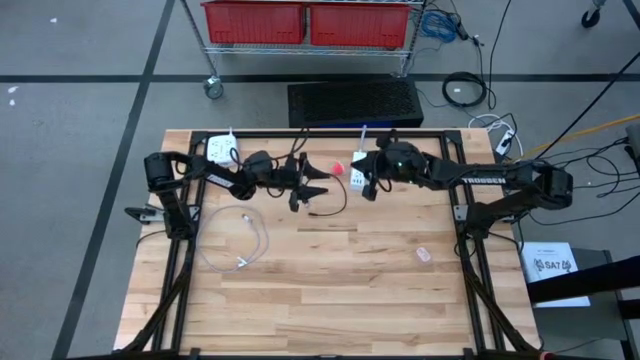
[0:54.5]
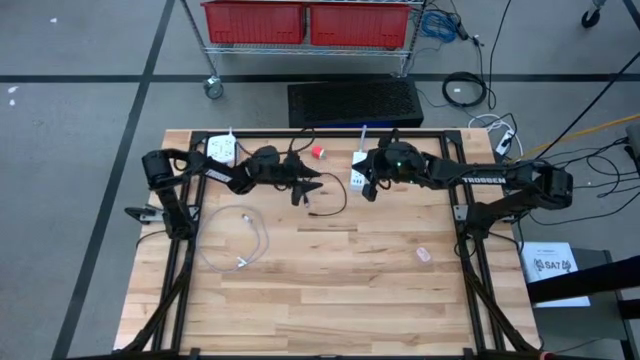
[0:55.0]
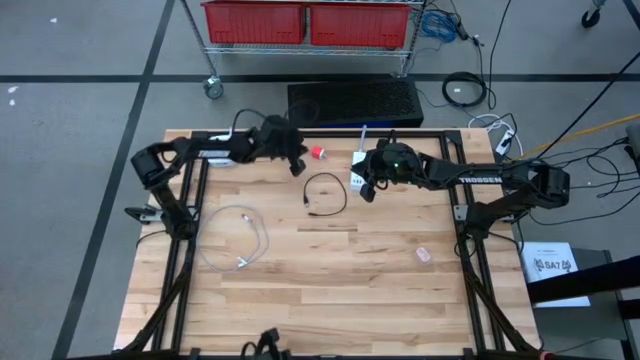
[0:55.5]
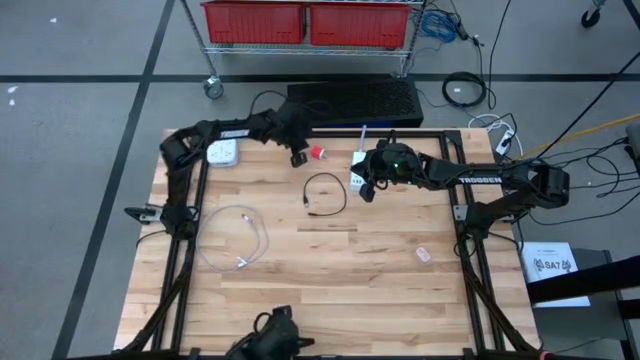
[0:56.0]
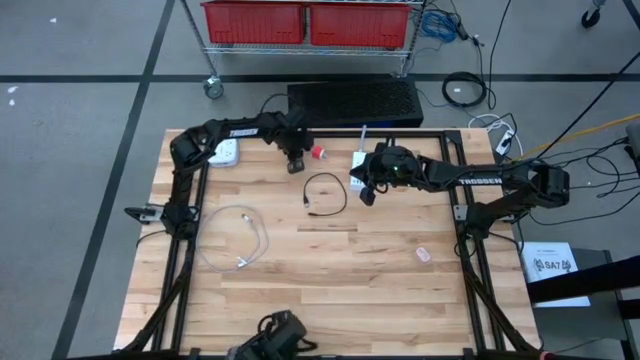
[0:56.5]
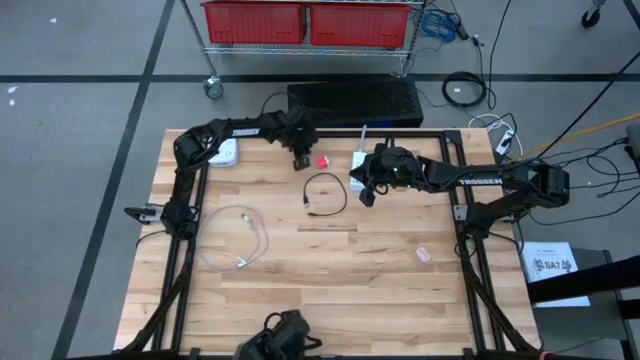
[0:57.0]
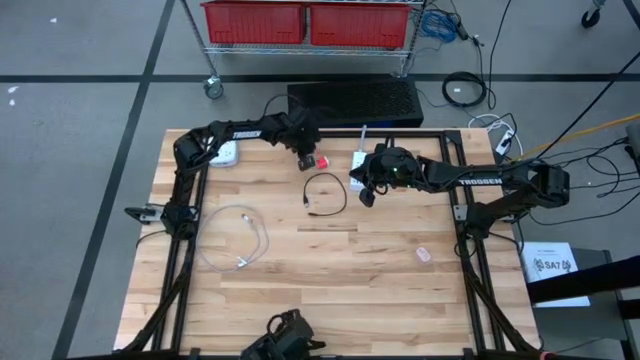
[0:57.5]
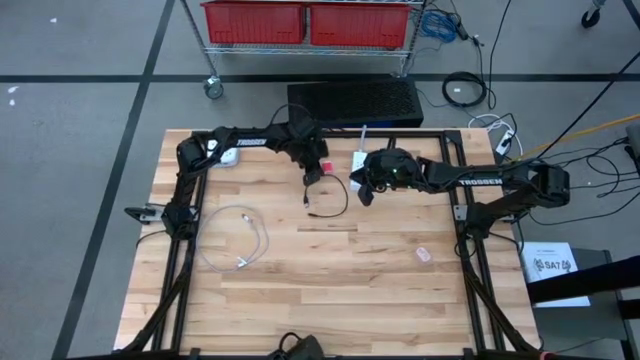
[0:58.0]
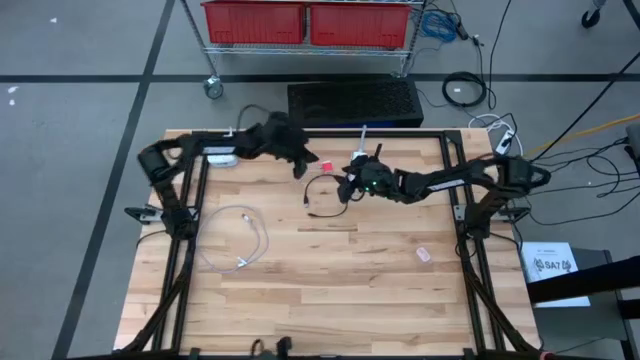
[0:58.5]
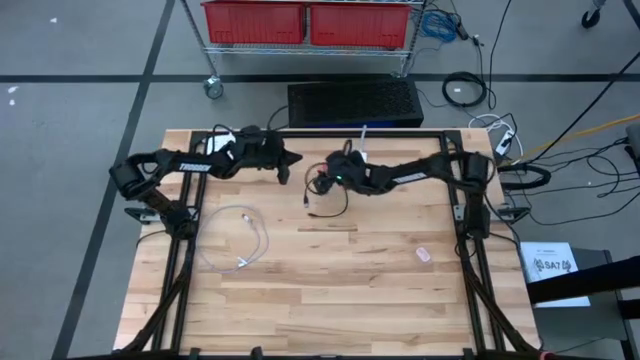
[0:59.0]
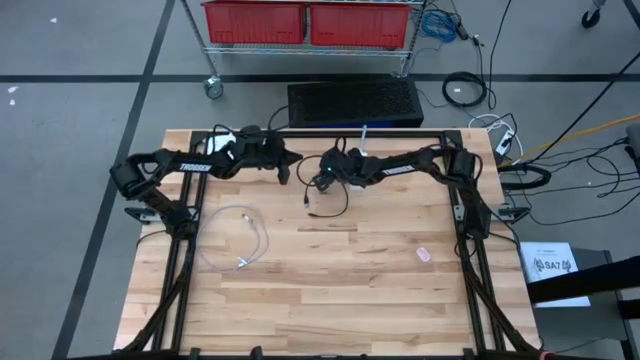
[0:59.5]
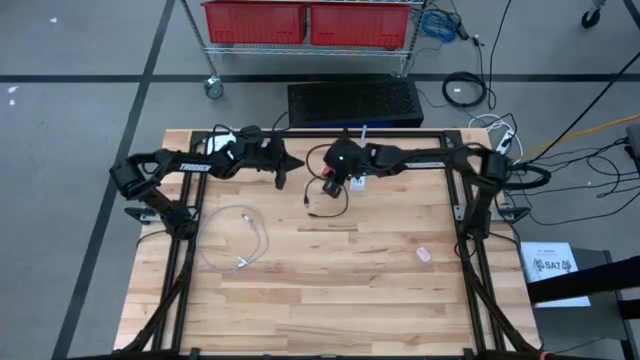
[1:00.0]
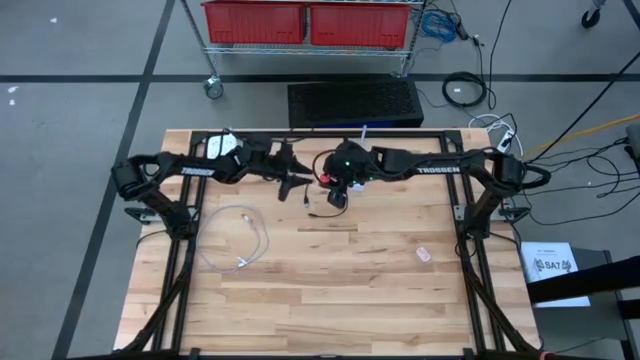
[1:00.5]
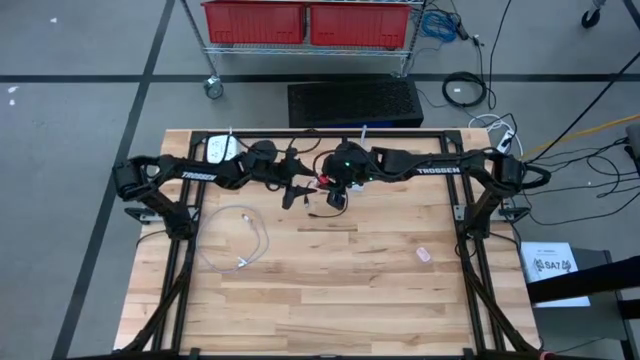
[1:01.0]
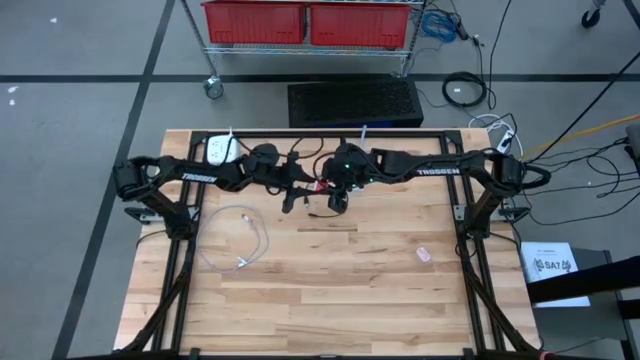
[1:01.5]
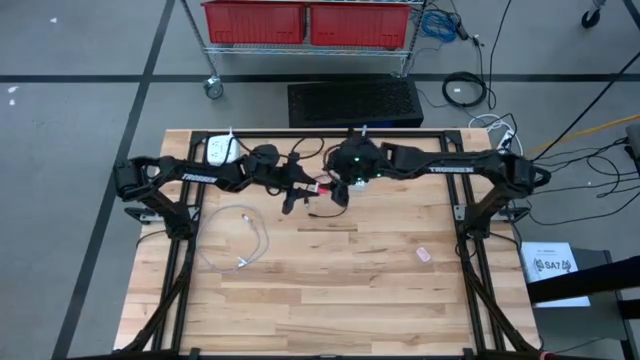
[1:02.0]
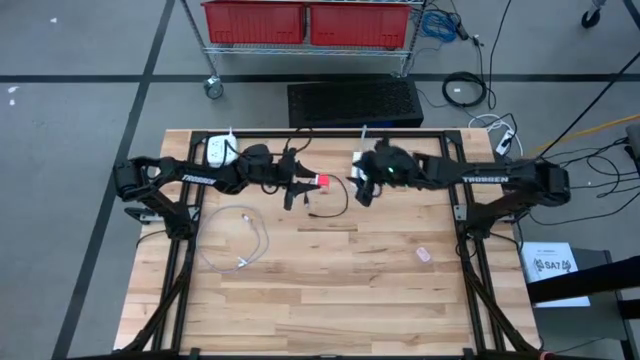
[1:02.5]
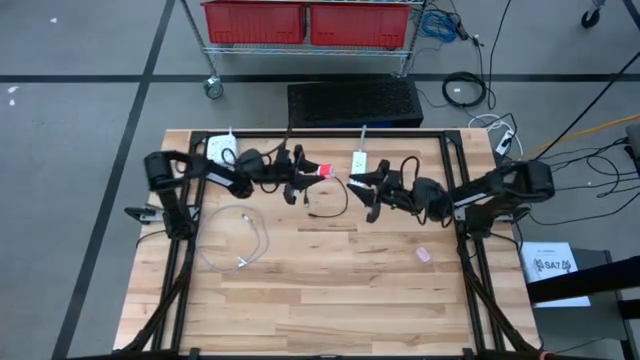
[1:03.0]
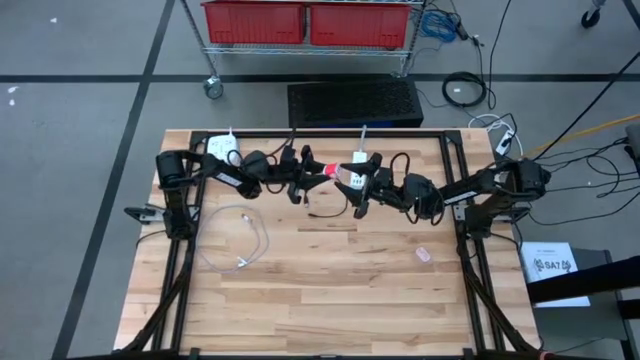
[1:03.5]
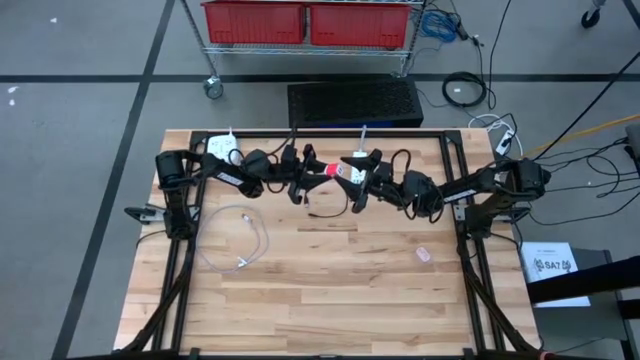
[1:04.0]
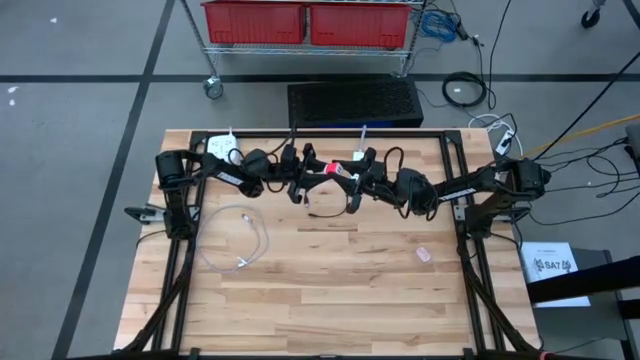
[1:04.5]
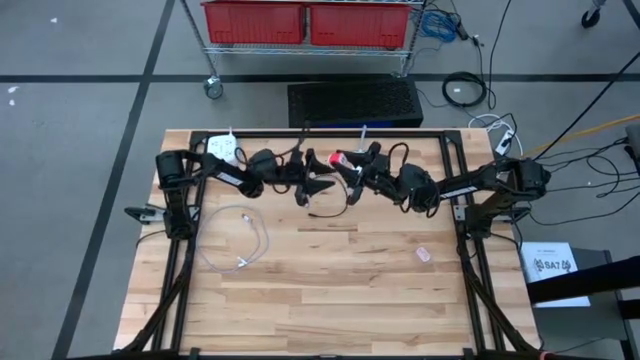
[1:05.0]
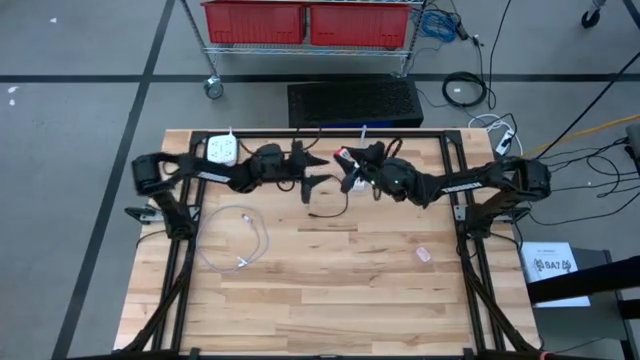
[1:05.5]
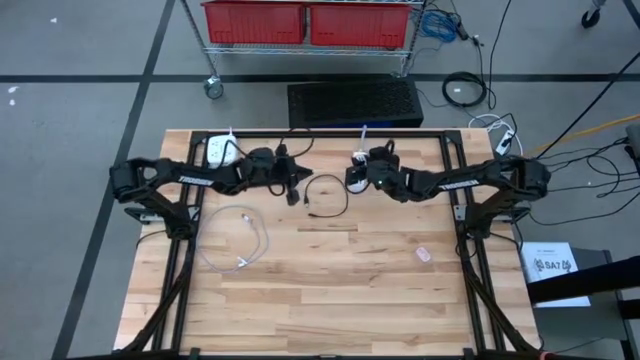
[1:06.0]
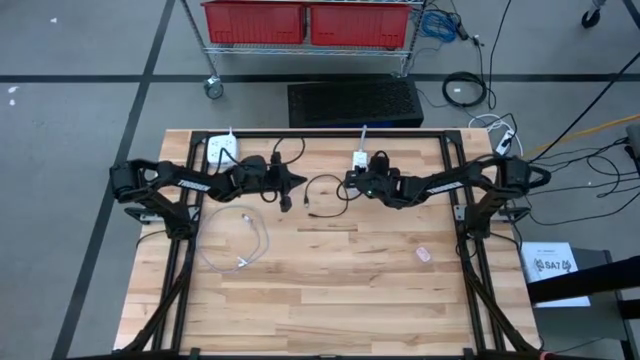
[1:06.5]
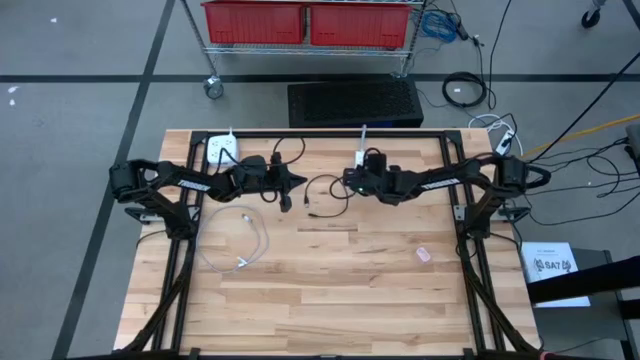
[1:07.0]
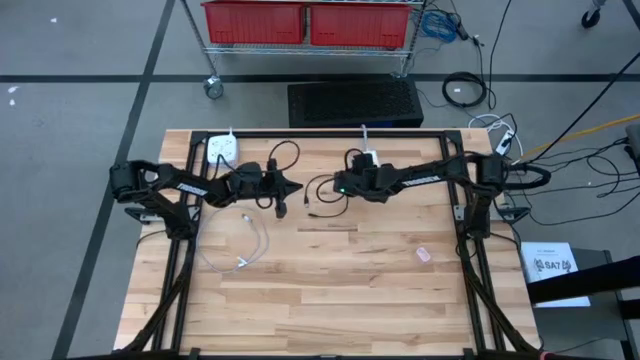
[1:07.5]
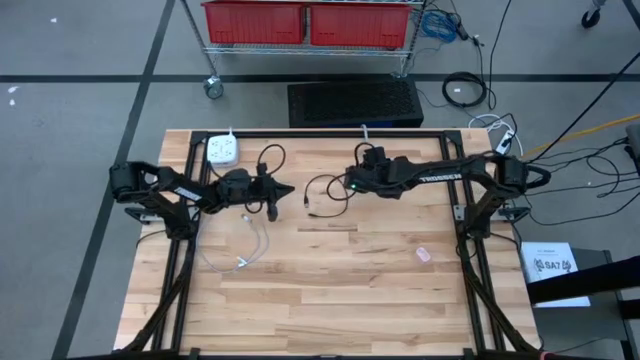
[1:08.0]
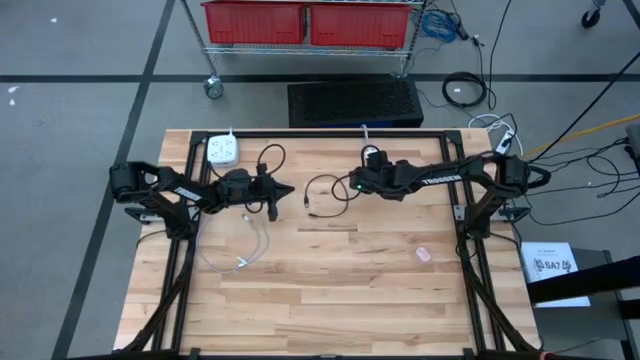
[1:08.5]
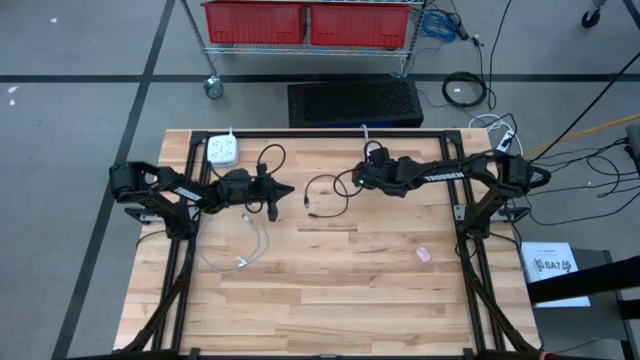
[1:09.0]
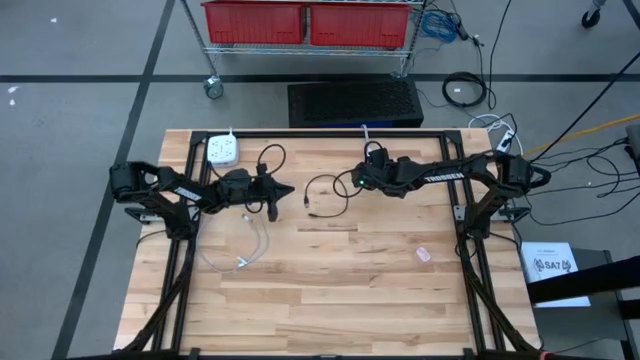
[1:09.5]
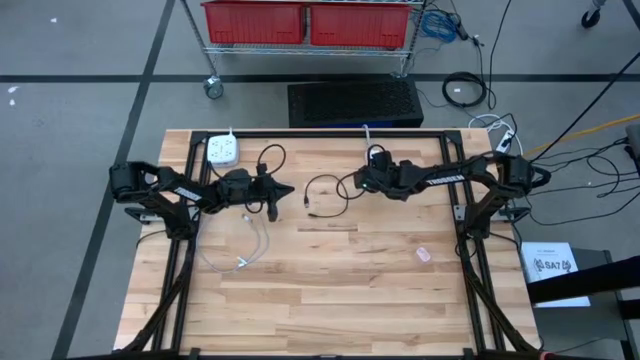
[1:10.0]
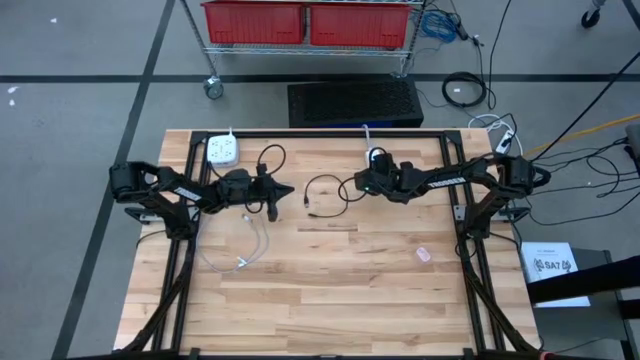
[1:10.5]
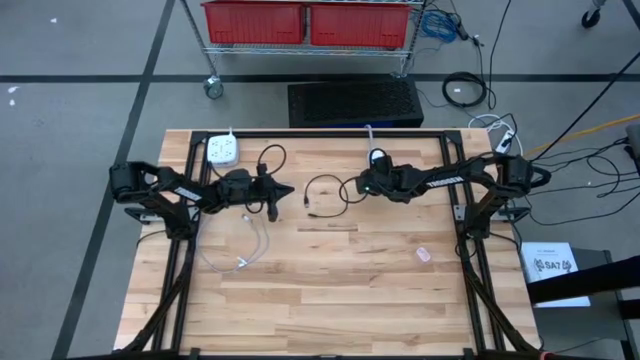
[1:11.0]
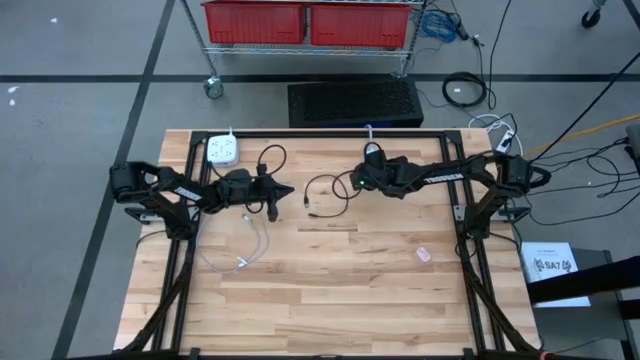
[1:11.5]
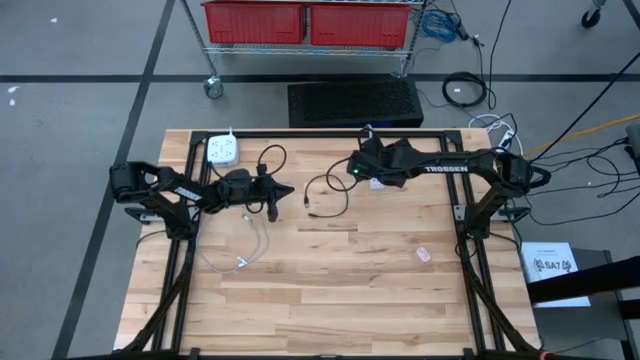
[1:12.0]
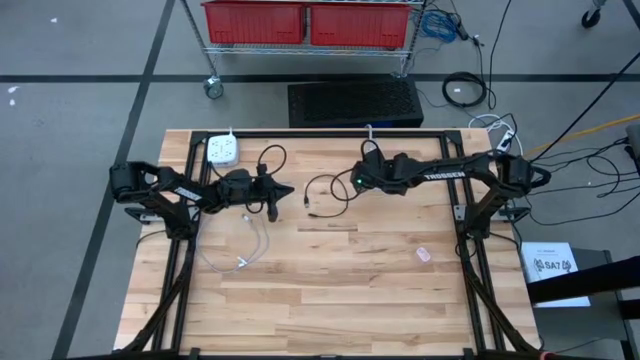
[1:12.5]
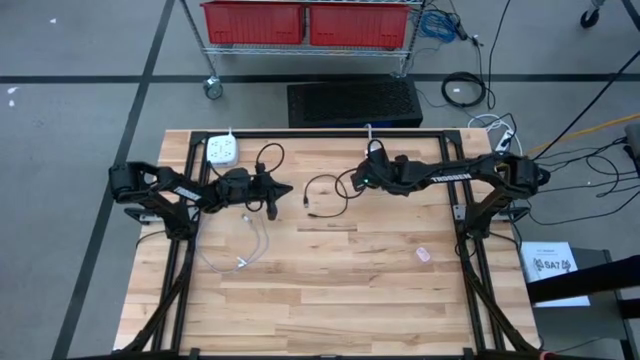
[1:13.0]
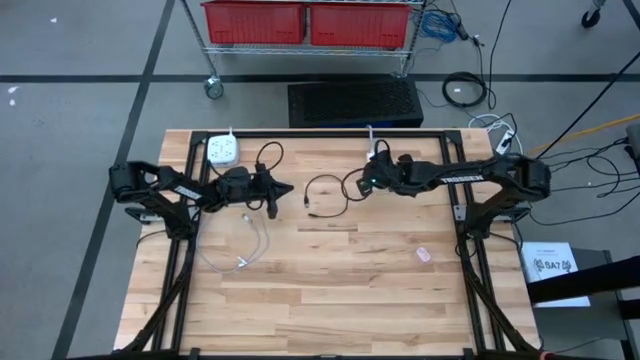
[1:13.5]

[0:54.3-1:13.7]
Task: Insert USB
Insert the red charger adapter into the right outlet extension

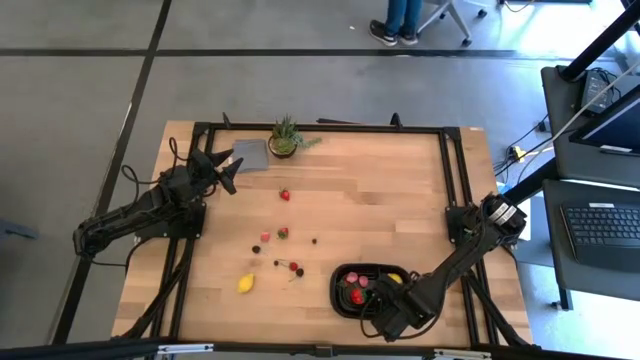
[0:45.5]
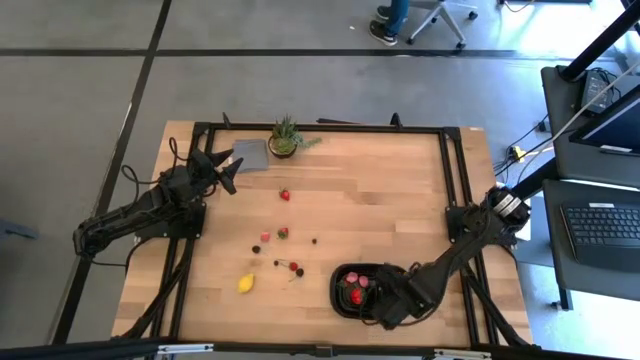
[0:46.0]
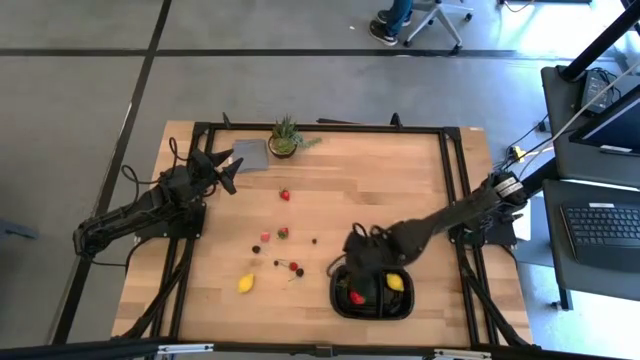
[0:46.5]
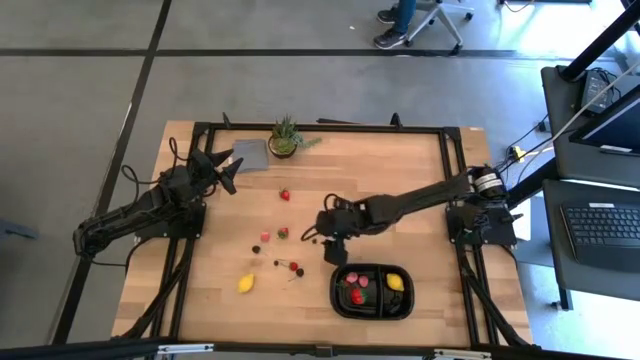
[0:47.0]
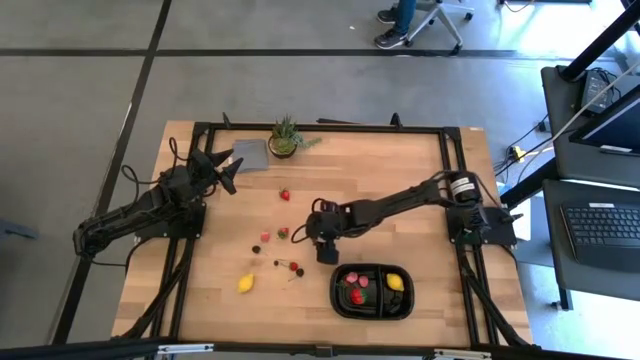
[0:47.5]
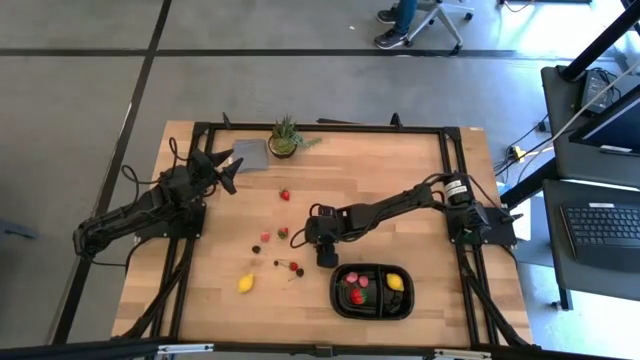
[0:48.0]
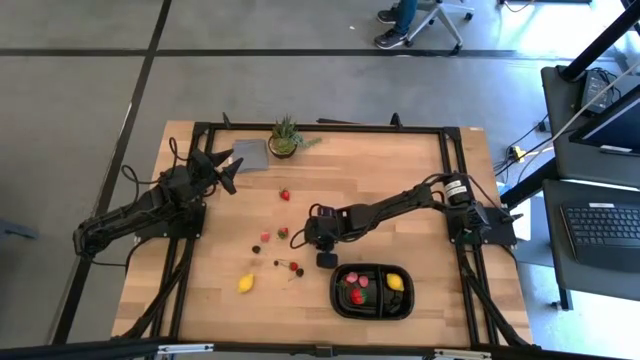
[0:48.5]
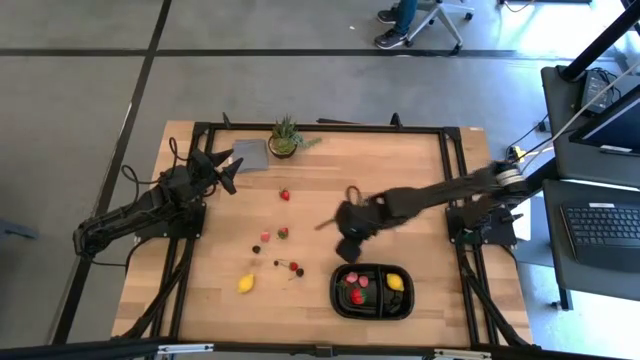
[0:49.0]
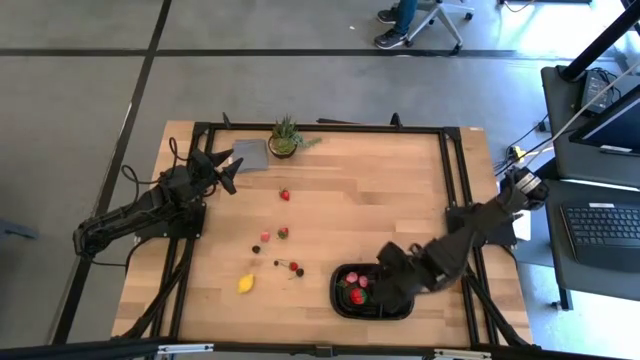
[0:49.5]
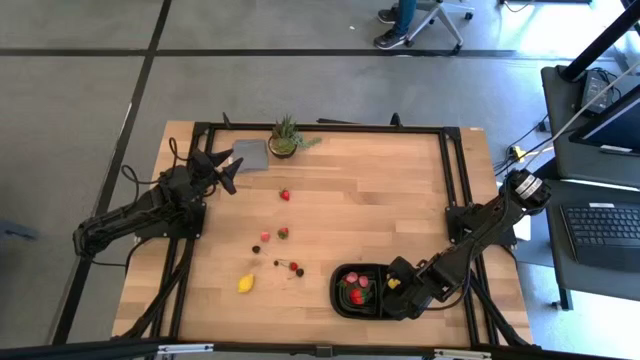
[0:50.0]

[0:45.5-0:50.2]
Task: Pick and placing Produce into tupperware
Put the blue blueberry into the black bin
